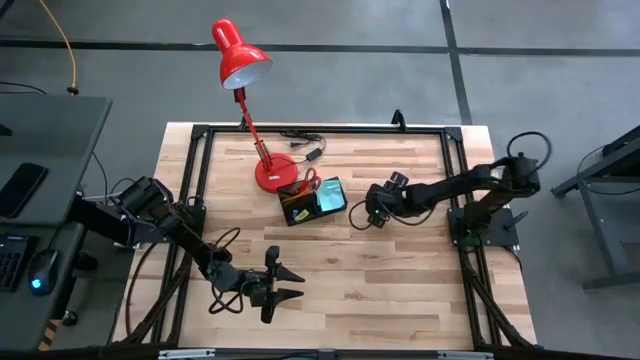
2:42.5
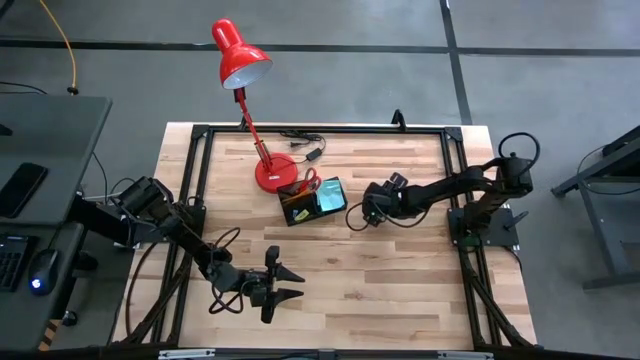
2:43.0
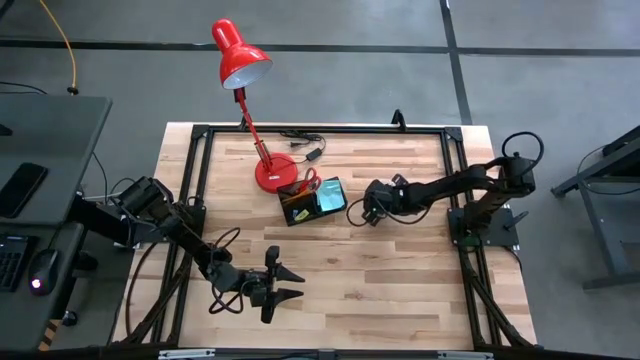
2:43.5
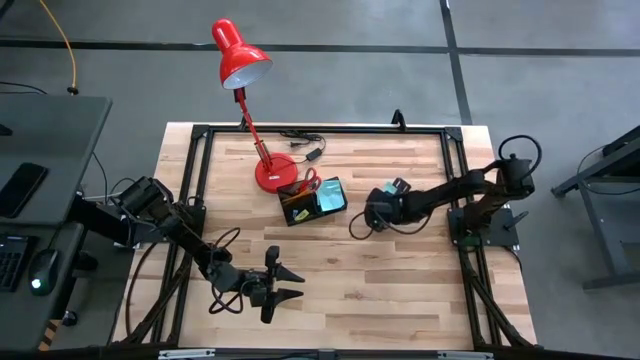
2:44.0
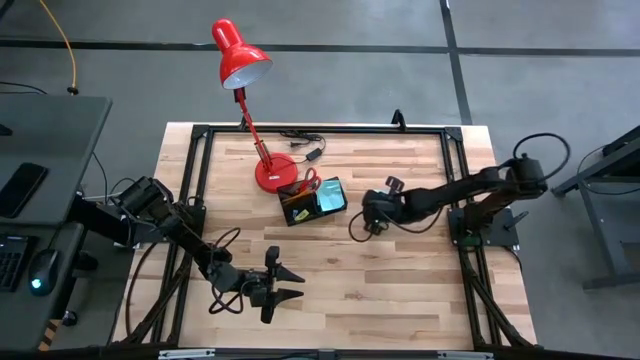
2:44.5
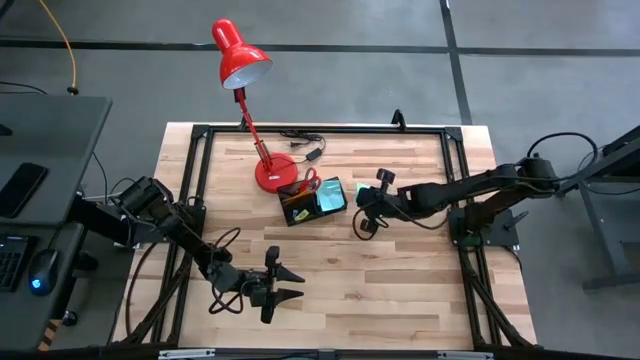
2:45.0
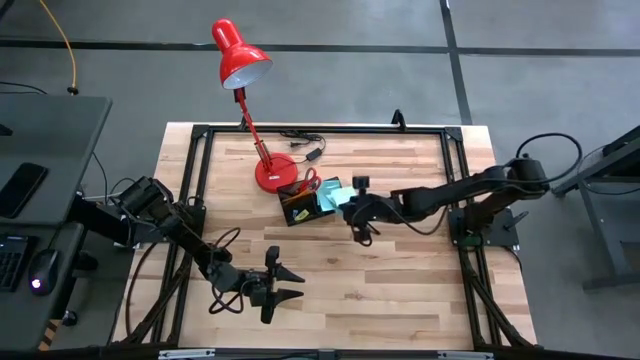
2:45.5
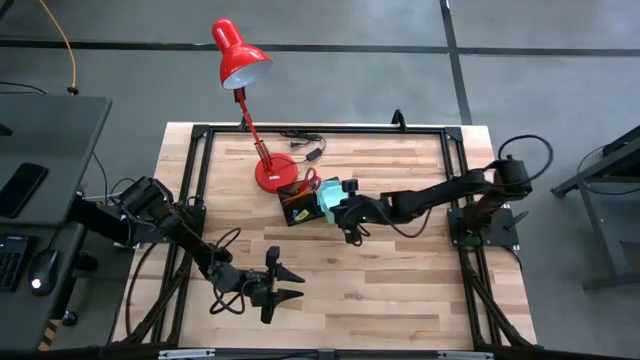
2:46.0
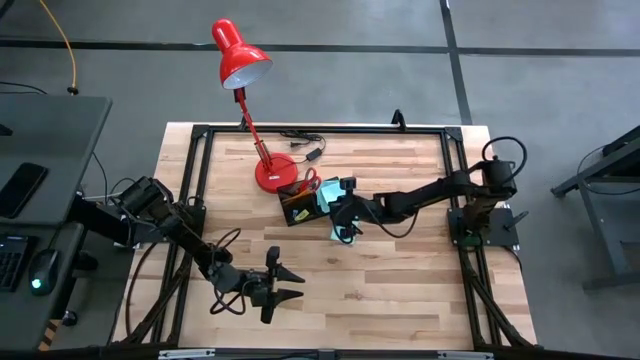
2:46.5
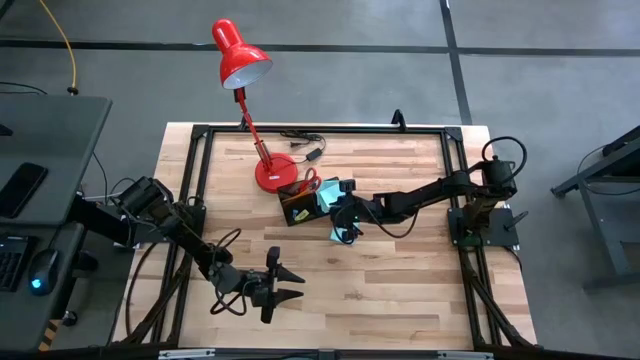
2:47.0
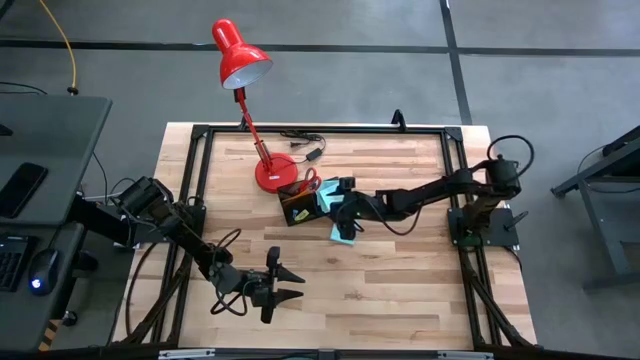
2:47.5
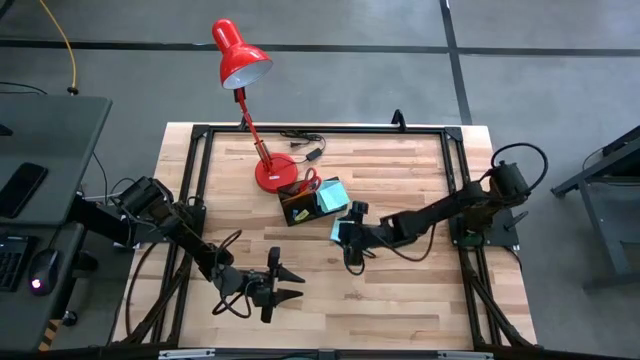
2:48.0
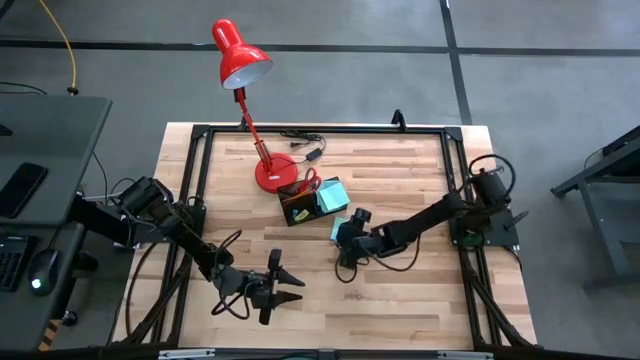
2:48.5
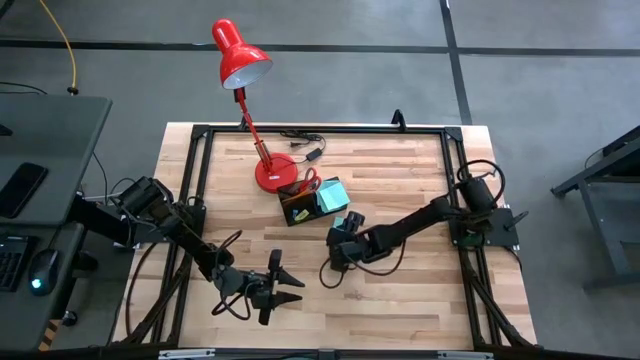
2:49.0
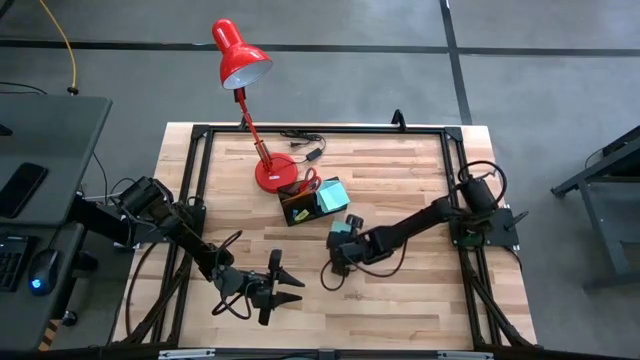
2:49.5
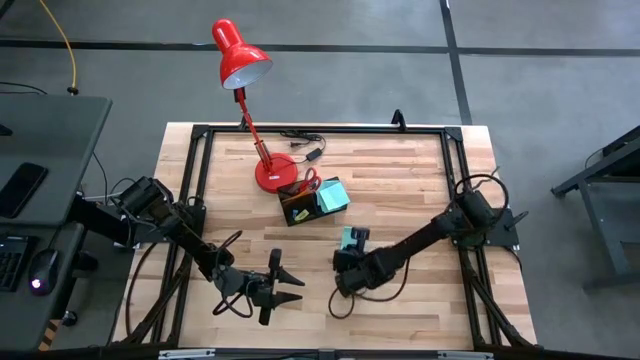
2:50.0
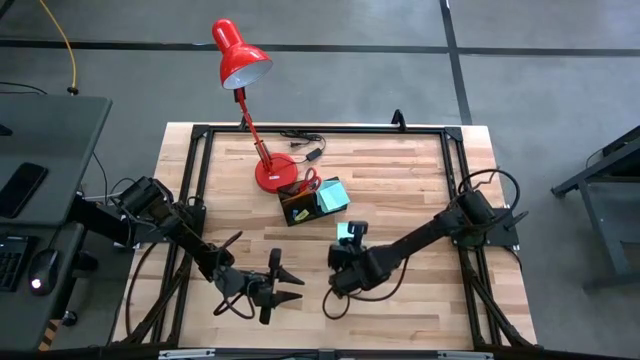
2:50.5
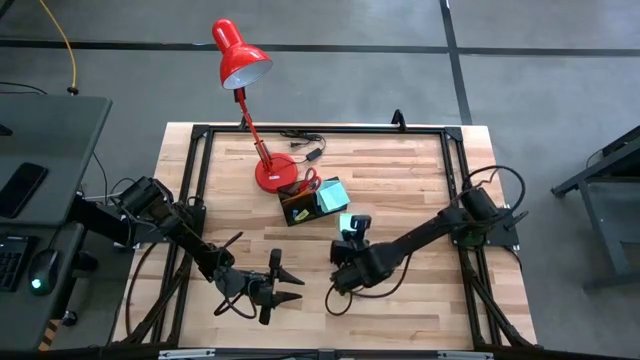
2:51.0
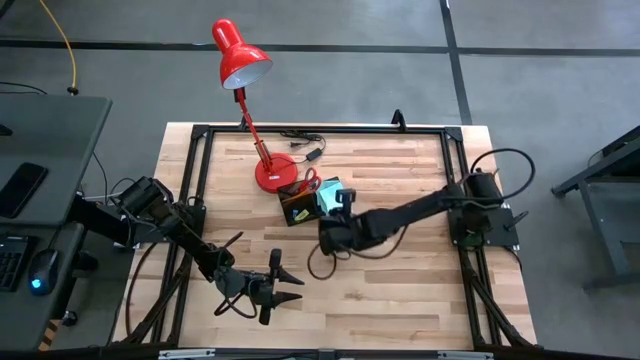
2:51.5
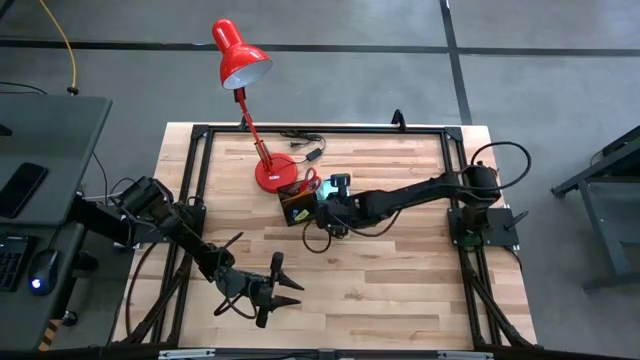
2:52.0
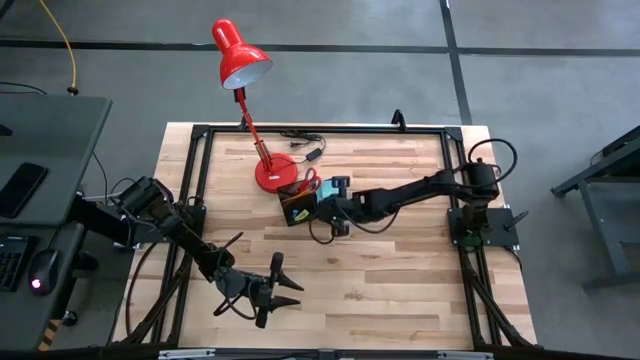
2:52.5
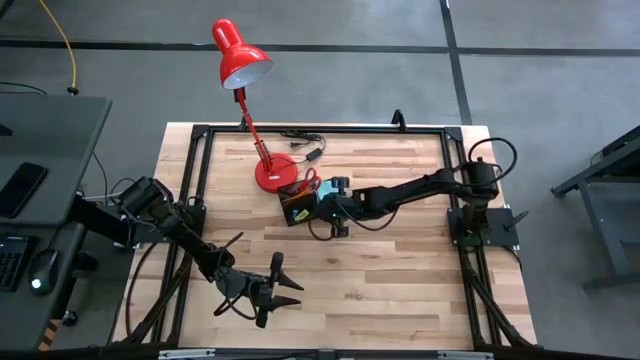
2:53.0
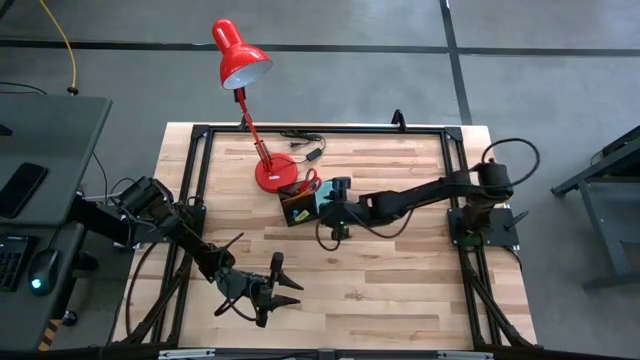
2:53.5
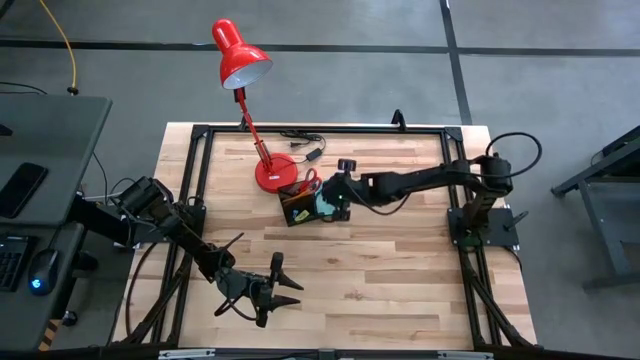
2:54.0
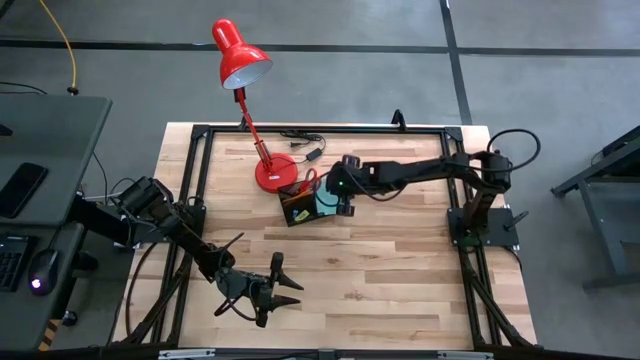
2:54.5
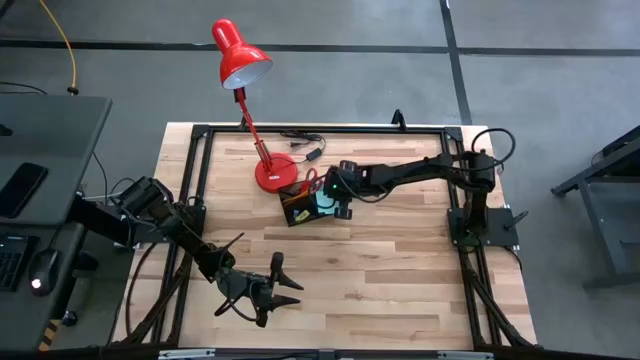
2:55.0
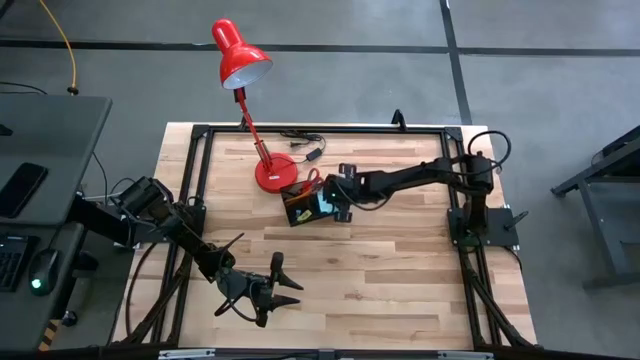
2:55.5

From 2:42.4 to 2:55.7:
Task: Pick and place office supplies into organizer
Put the blue sticky notes into the desk organizer

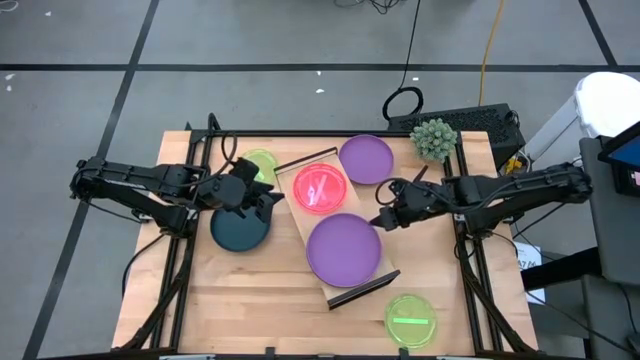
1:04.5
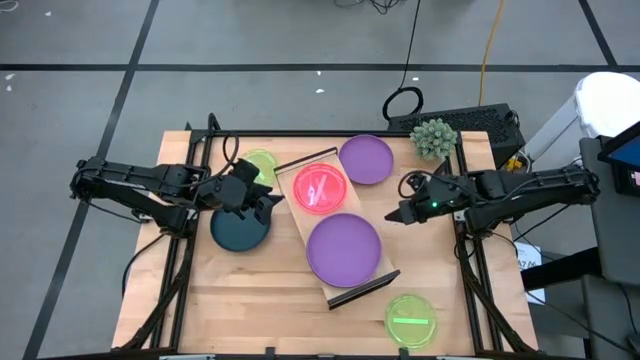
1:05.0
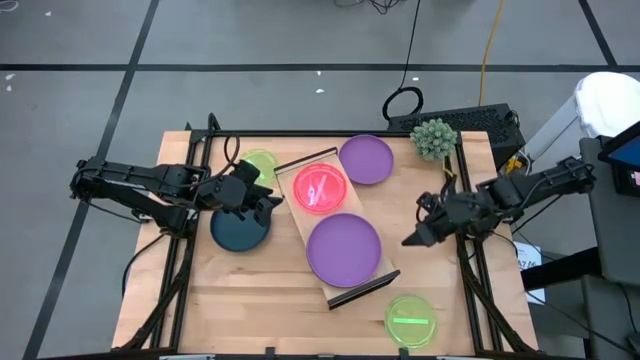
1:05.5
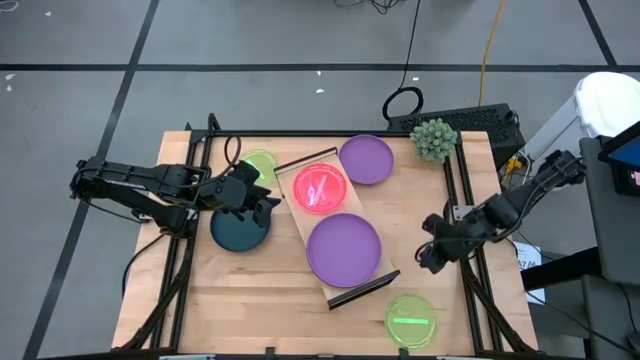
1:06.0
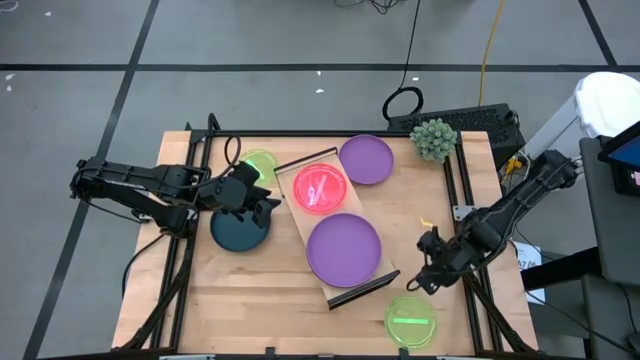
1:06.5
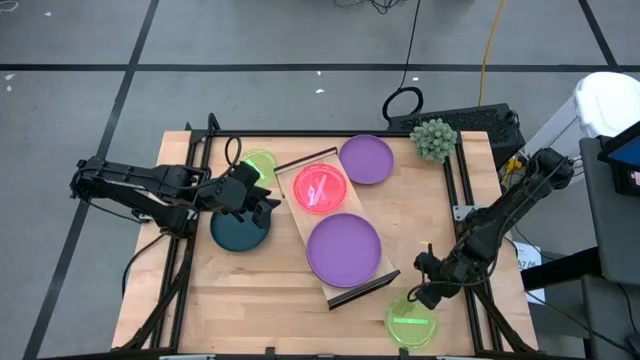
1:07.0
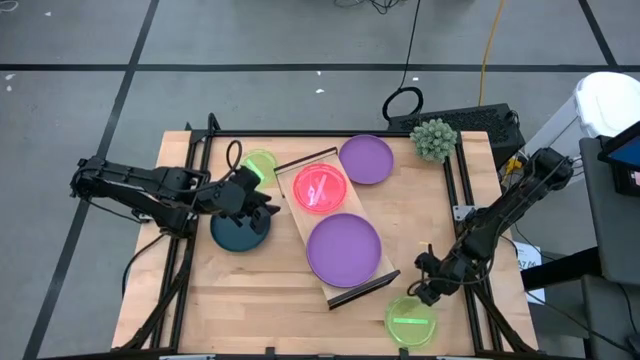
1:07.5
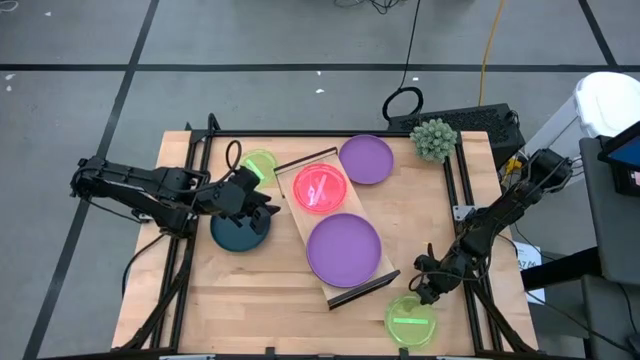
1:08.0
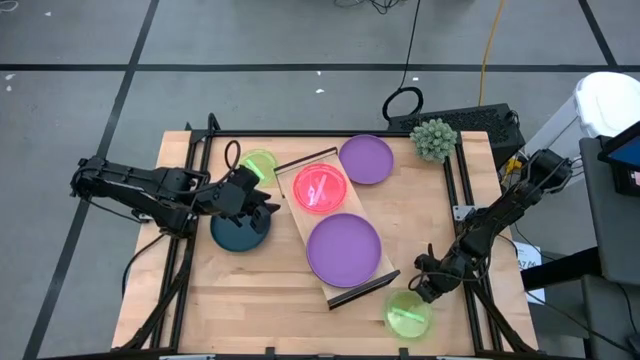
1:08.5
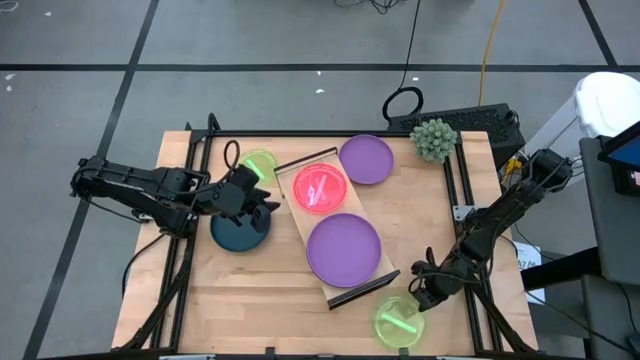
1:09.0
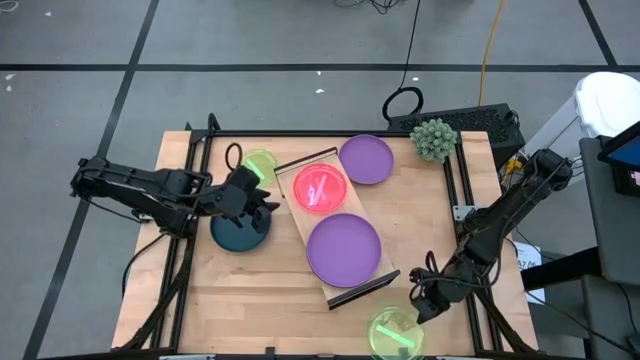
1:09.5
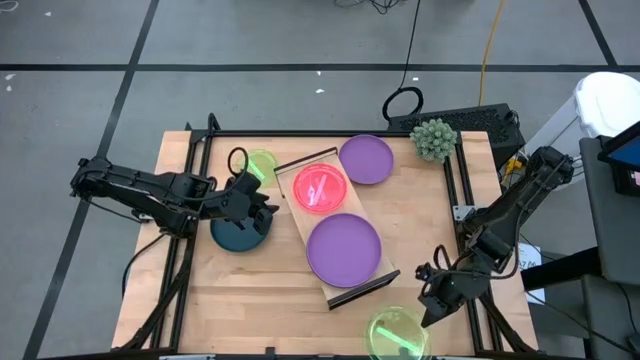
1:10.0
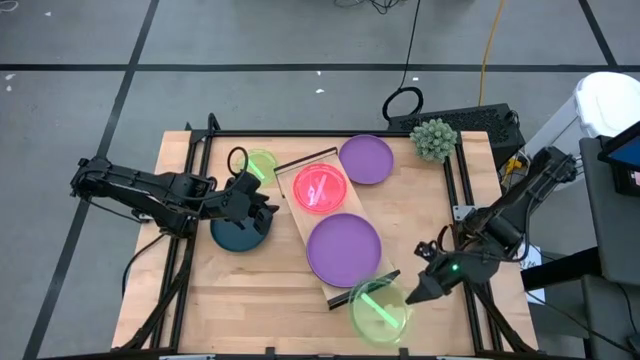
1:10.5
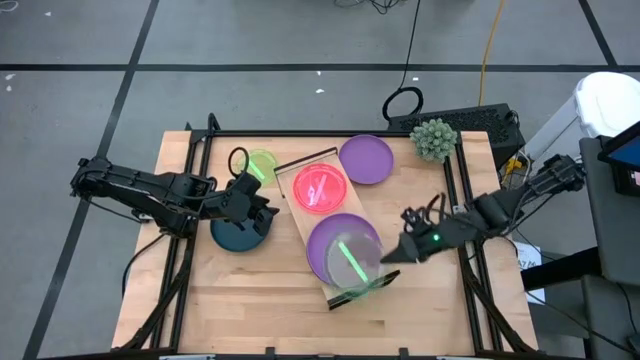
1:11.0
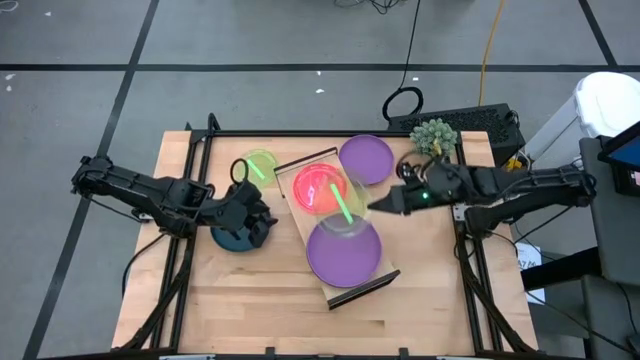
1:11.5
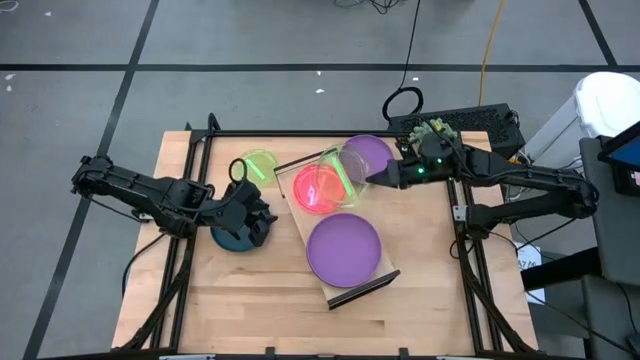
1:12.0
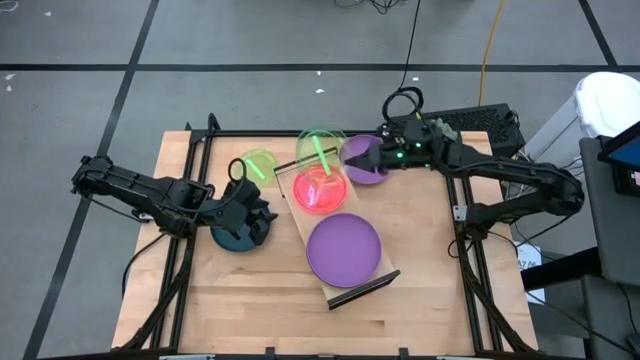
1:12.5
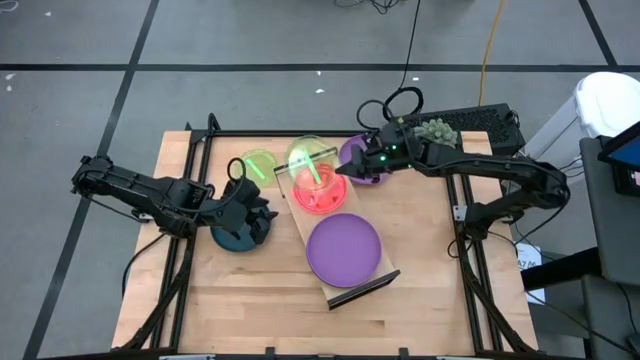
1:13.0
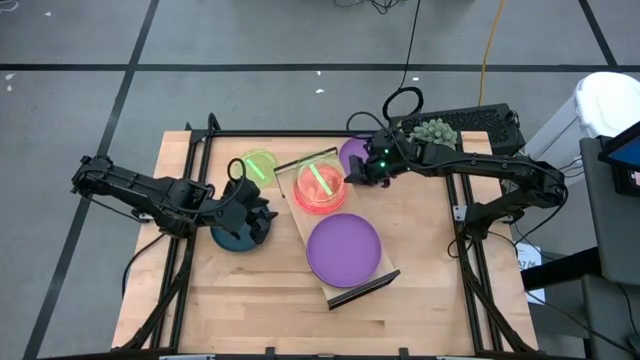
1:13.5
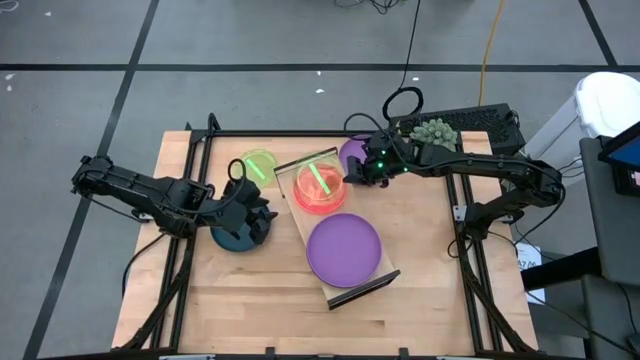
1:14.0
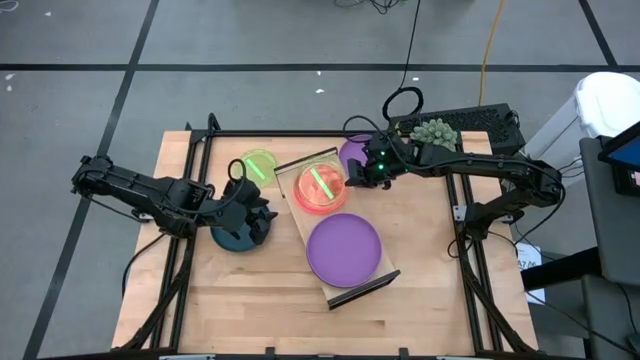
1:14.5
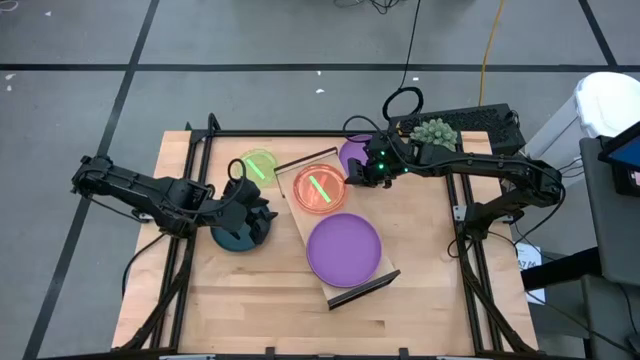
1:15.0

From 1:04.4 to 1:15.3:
Task: Place and stack plates onto a shelf
Stack the bottom green plate on top of the pink plate on the shelf
